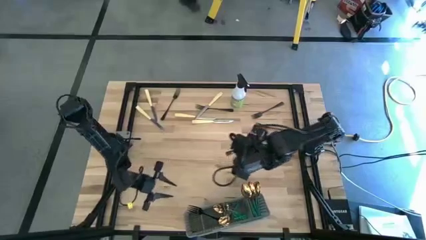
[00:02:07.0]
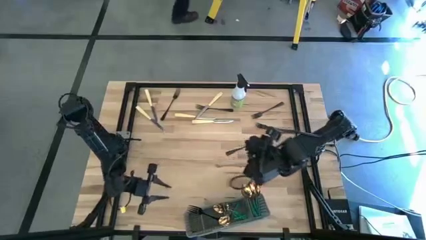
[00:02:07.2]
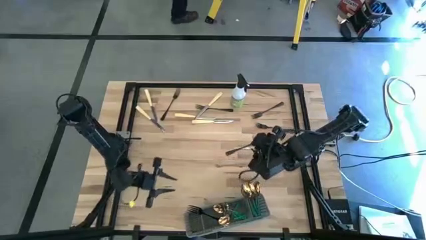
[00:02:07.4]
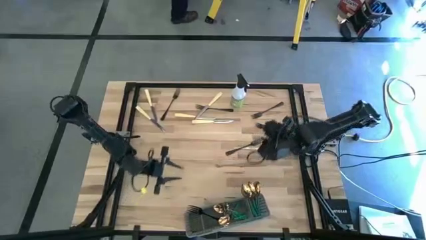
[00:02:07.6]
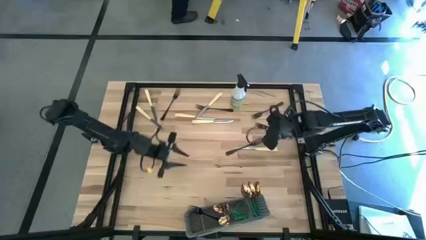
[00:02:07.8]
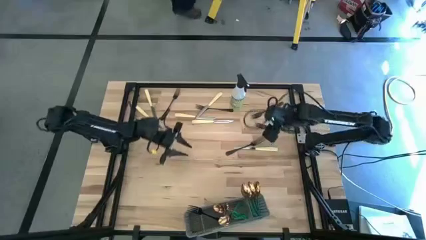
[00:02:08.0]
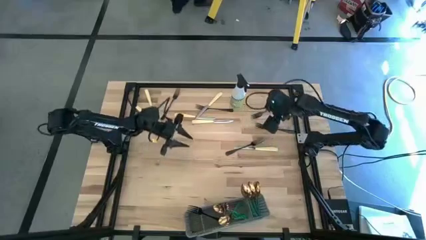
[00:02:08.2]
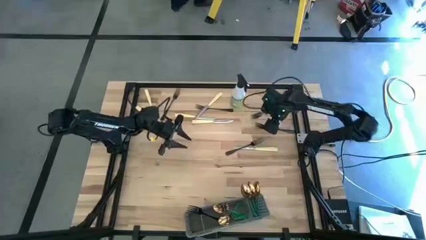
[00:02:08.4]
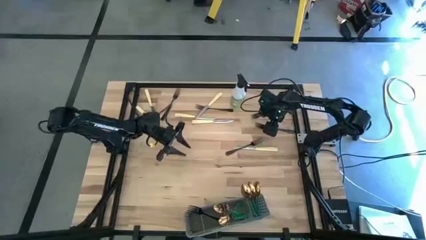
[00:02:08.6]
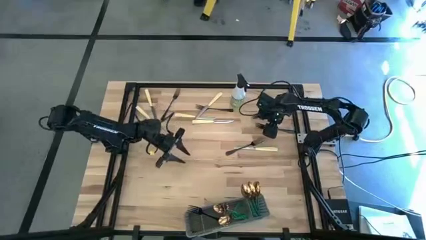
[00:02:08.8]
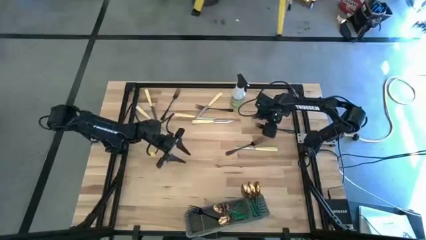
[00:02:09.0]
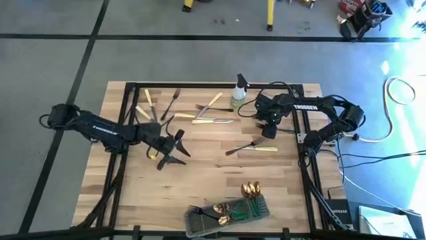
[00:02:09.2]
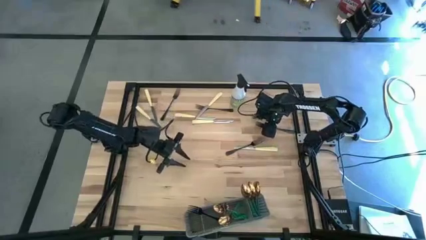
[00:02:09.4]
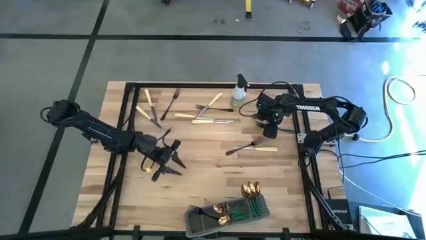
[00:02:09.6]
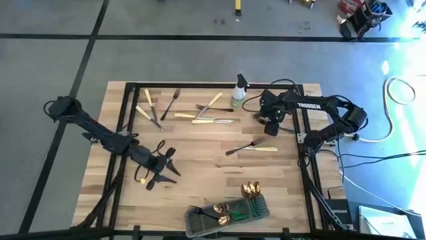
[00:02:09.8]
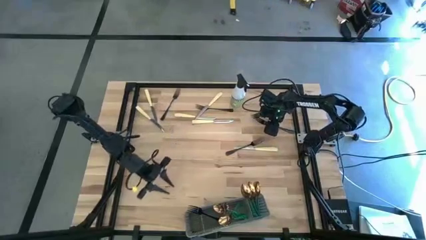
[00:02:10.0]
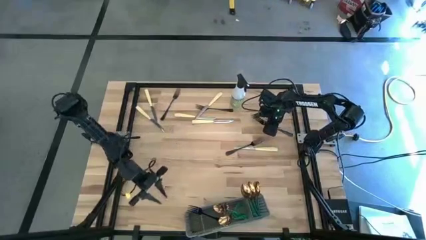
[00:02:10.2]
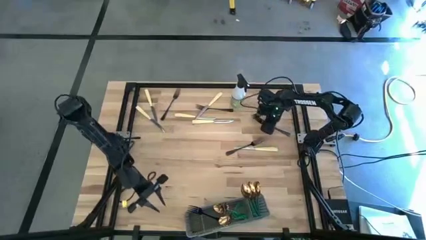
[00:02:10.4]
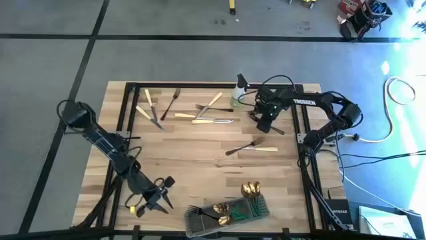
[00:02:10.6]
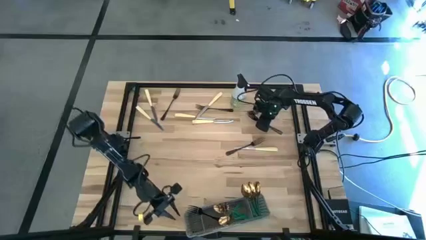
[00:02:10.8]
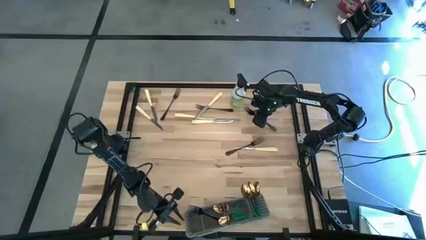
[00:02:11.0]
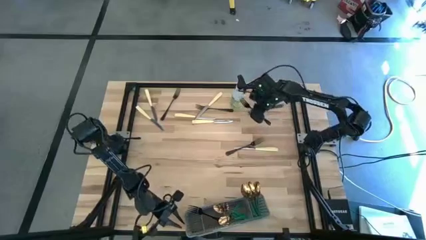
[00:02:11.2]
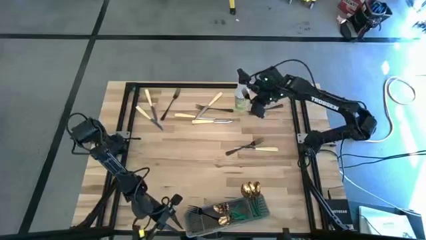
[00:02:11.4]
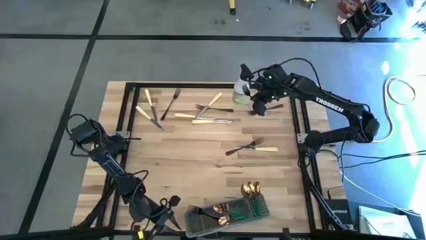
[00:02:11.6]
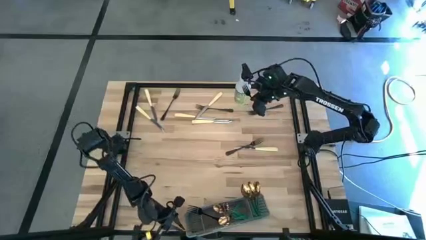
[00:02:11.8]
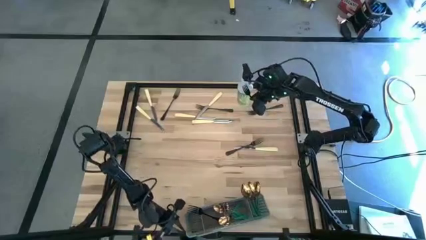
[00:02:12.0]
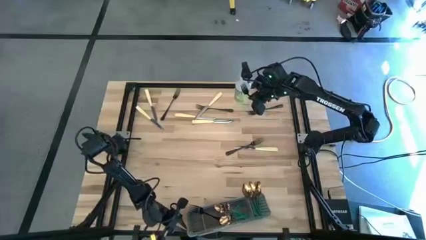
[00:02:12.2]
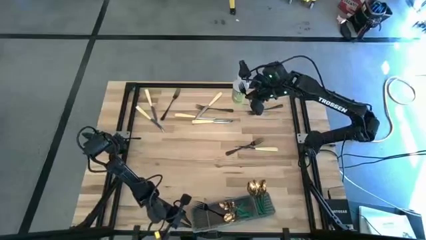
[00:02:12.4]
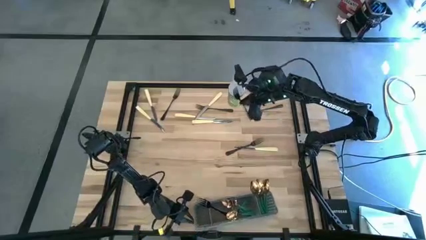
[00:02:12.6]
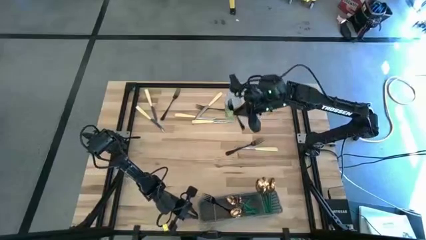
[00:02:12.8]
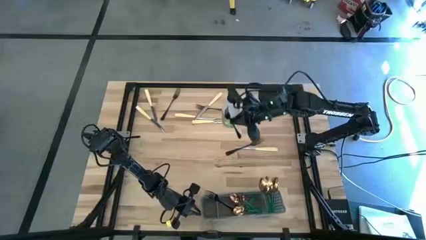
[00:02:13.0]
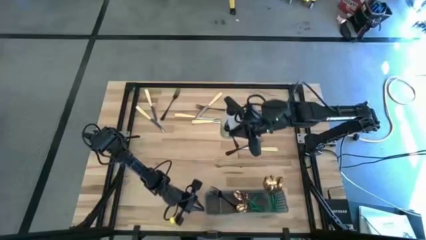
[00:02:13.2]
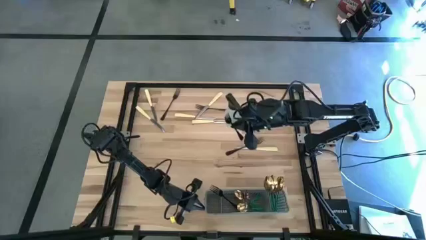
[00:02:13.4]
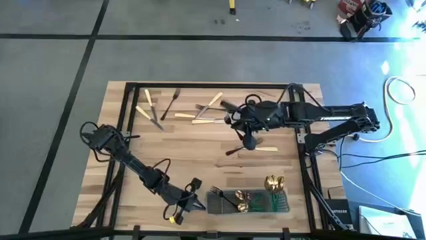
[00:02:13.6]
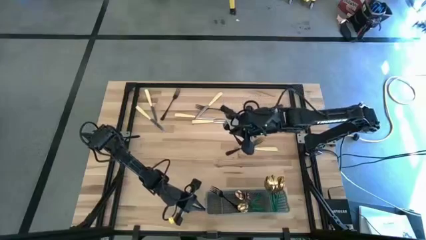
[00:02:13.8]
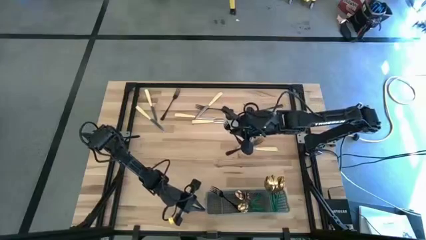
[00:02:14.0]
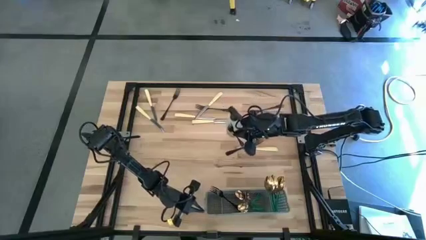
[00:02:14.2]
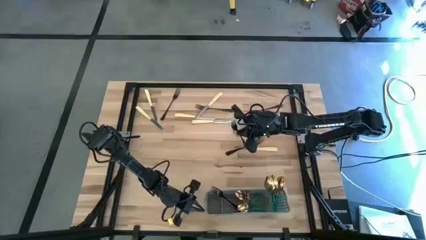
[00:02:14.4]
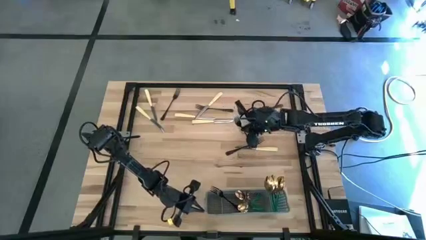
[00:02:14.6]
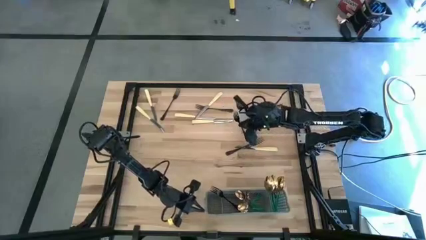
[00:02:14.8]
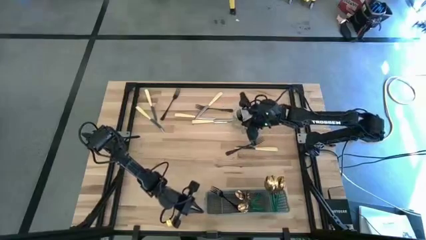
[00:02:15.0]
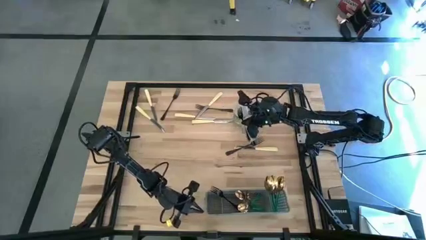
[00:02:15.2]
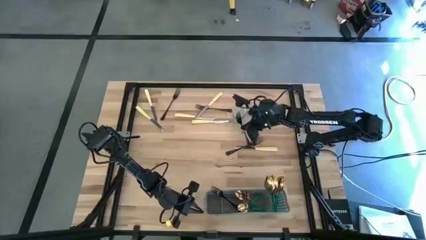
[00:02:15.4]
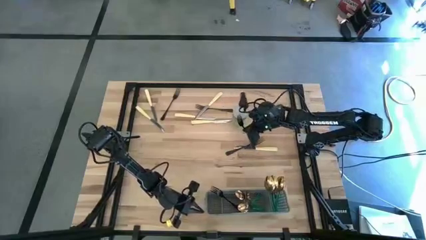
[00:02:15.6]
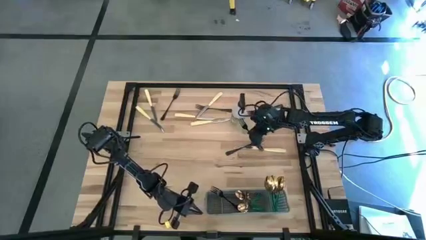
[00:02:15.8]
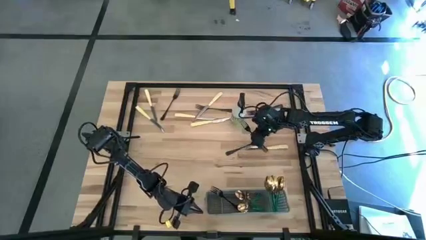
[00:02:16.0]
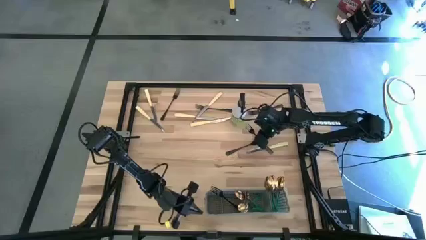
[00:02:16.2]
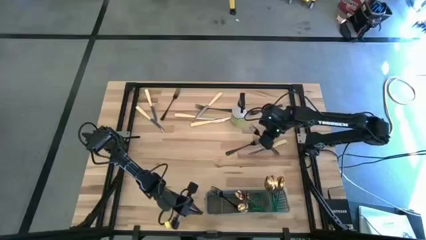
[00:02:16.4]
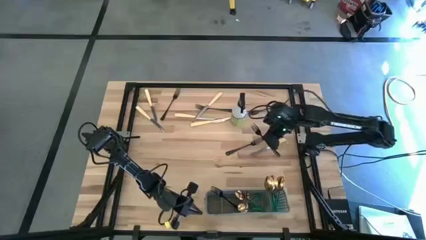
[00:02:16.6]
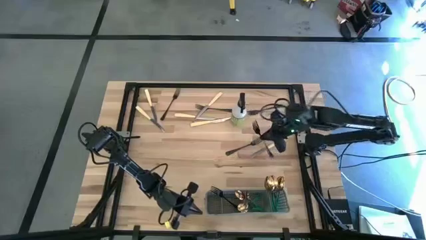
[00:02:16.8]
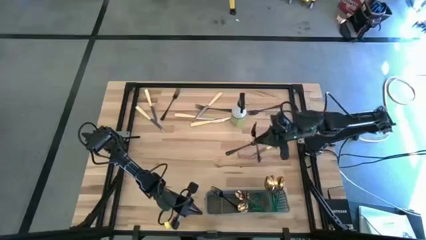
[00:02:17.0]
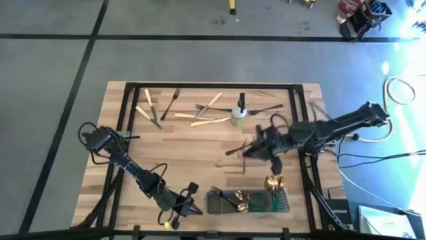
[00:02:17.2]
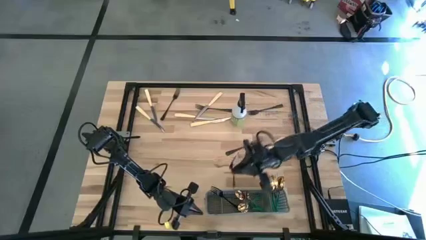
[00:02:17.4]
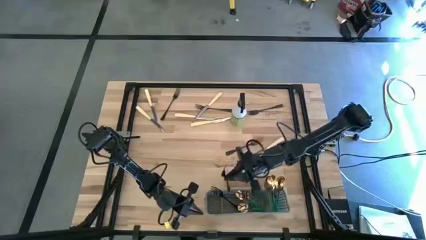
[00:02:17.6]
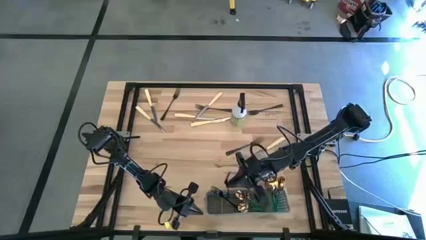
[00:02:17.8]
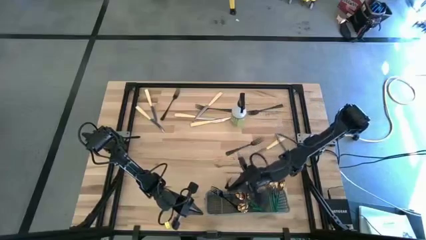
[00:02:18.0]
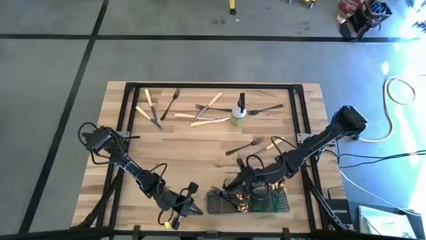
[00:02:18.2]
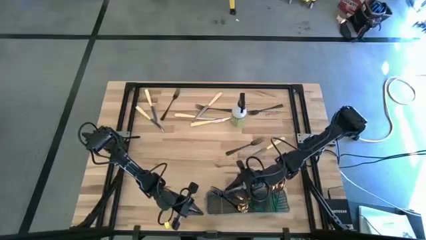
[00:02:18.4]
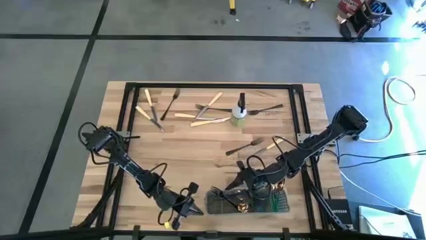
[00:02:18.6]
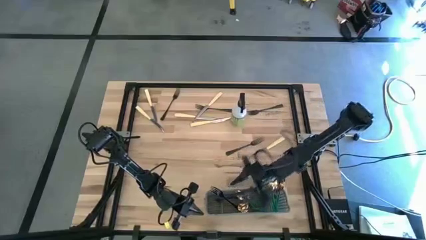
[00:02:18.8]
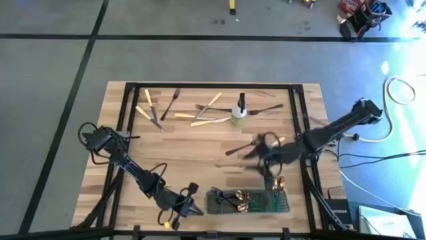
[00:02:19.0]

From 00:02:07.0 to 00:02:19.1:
Task: Sort silverware
Put the middle right black fork into the gray cutlery rack

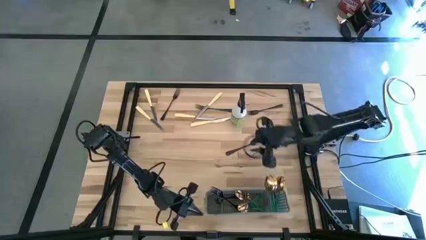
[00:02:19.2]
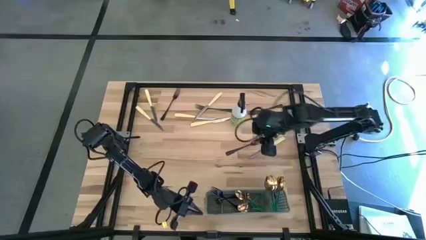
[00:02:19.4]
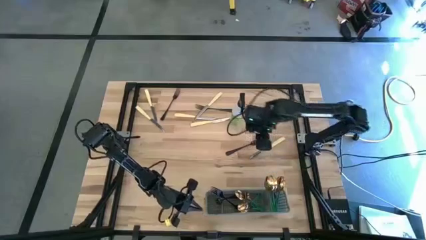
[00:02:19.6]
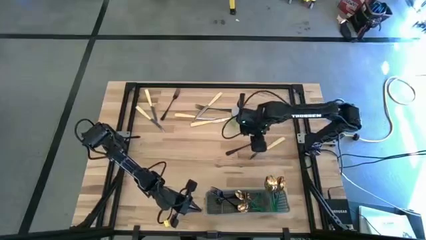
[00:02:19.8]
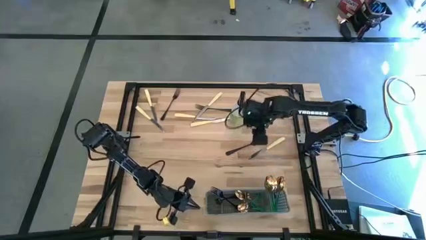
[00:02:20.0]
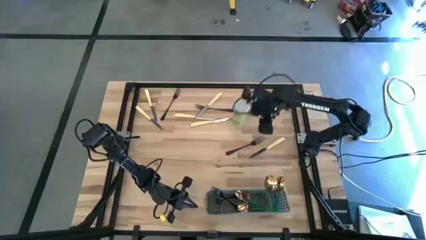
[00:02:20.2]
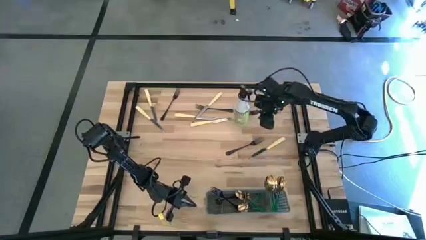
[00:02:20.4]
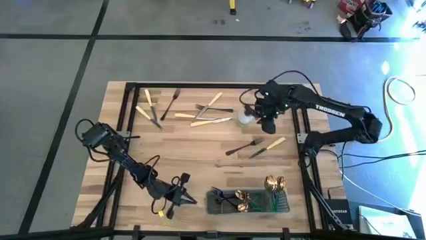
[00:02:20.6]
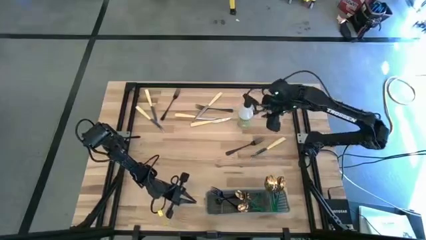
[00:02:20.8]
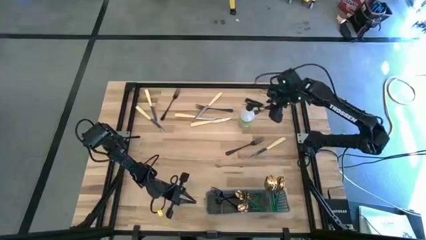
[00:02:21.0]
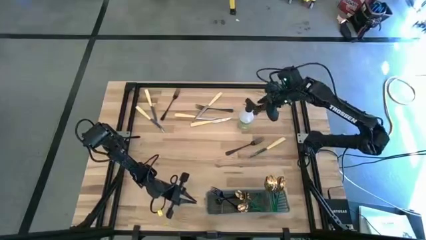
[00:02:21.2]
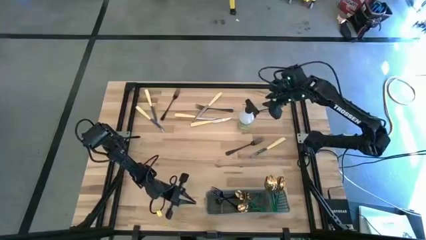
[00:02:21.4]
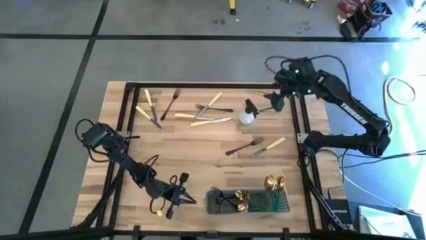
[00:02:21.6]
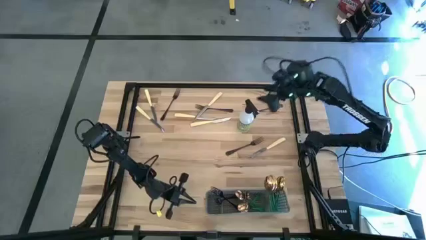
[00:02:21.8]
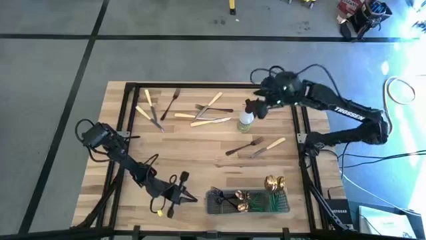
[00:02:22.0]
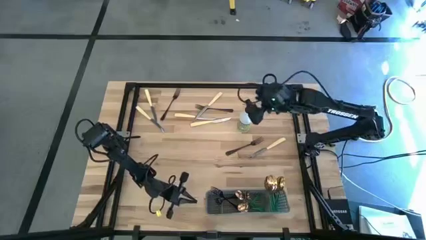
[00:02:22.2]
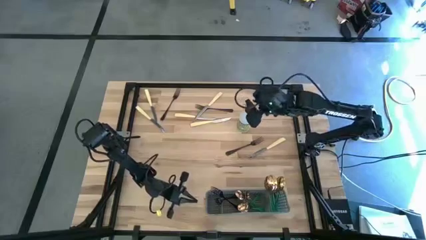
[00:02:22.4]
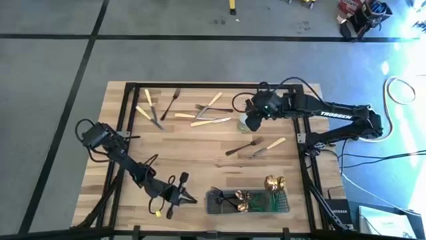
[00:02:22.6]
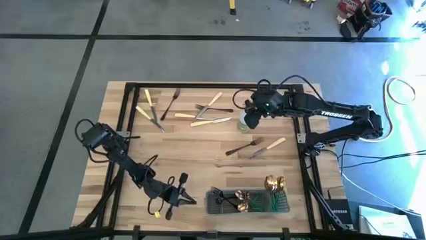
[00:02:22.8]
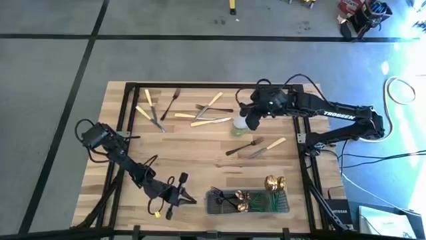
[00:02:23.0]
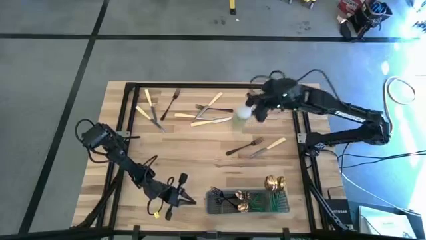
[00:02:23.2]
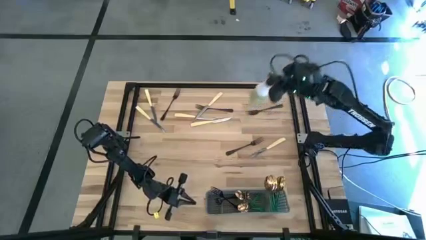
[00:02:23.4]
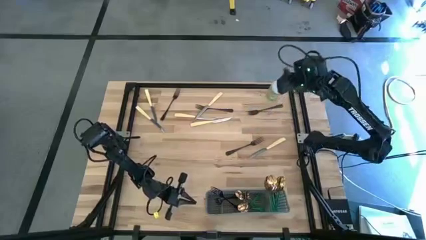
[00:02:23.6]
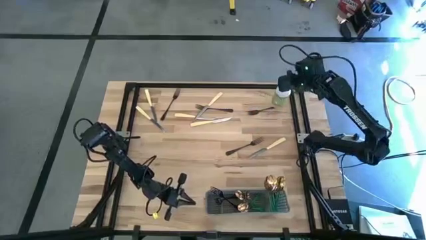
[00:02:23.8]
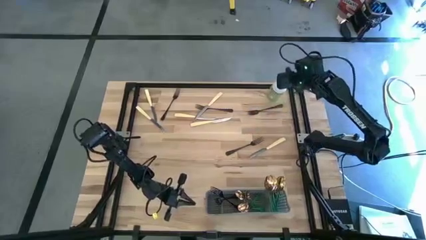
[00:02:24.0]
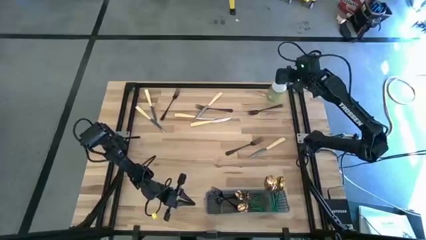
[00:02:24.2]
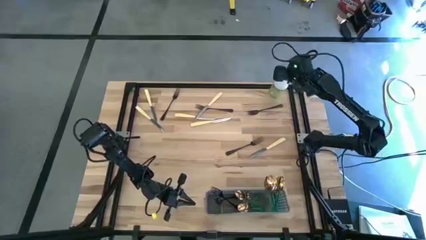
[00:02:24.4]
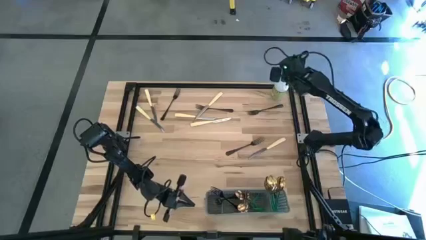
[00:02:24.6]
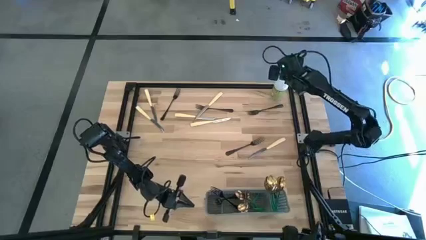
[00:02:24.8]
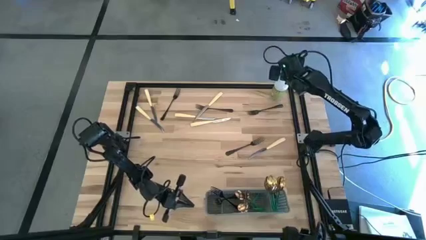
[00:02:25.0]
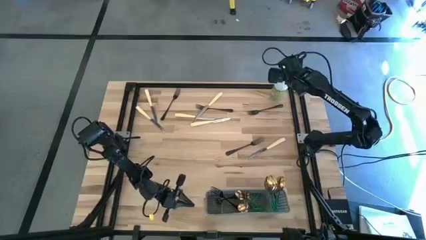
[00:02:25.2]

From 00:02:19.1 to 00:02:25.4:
Move the spray bottle from middle right to top right
